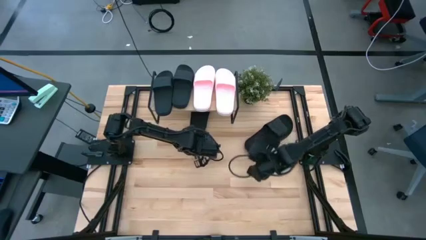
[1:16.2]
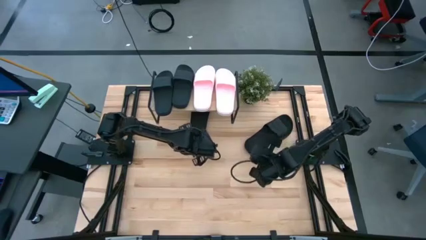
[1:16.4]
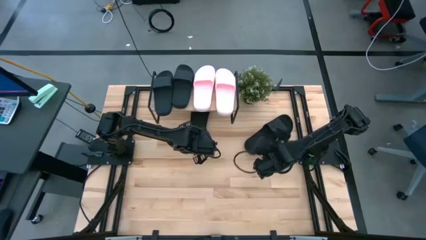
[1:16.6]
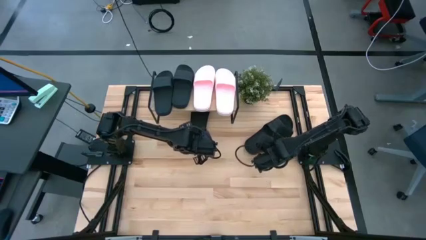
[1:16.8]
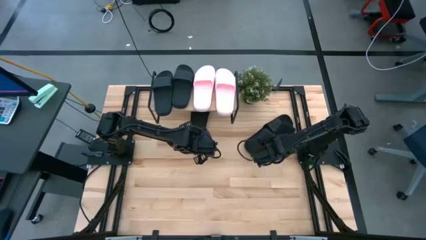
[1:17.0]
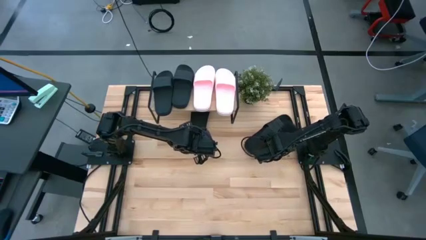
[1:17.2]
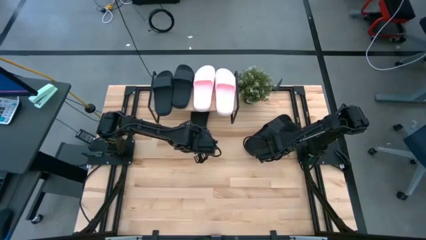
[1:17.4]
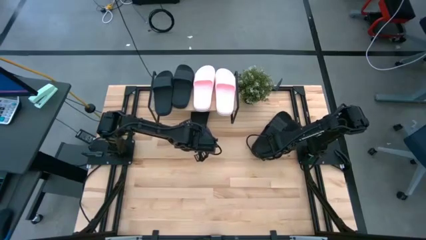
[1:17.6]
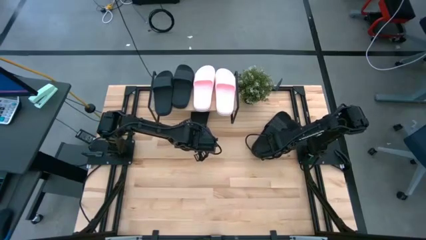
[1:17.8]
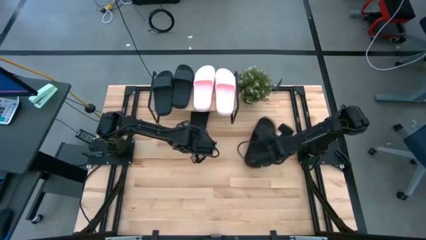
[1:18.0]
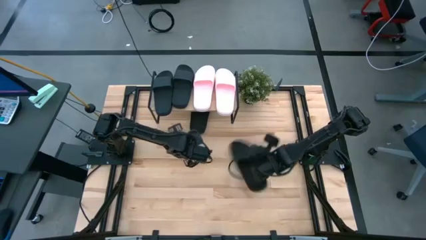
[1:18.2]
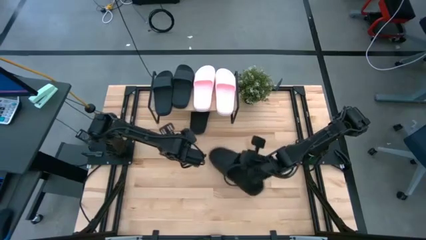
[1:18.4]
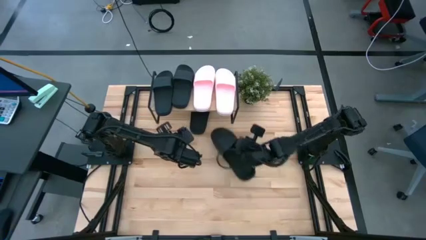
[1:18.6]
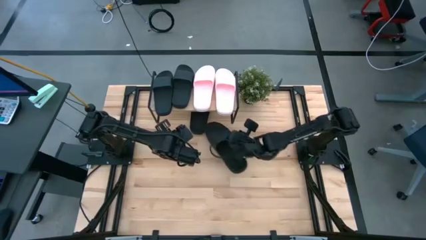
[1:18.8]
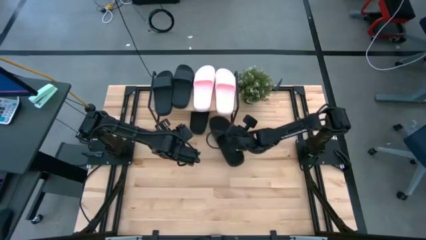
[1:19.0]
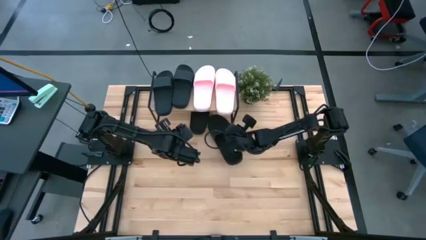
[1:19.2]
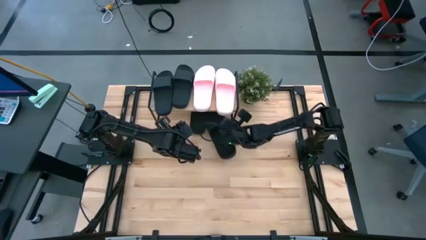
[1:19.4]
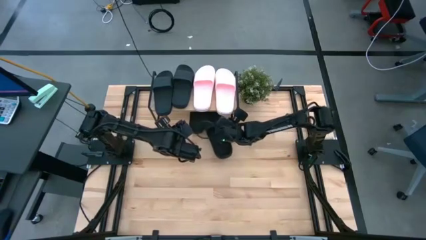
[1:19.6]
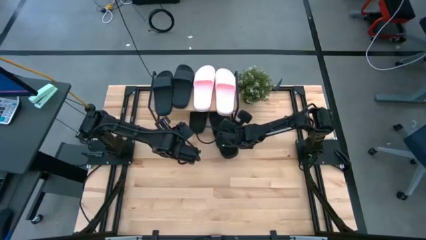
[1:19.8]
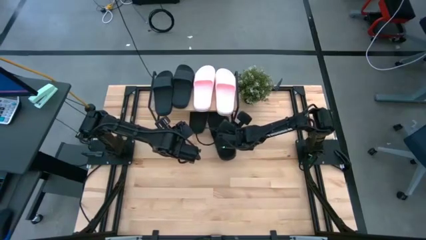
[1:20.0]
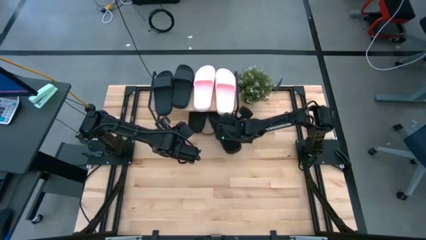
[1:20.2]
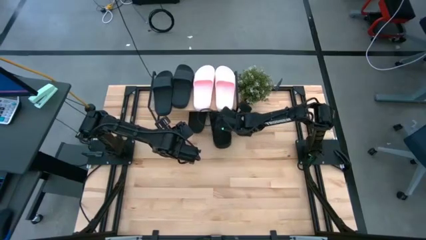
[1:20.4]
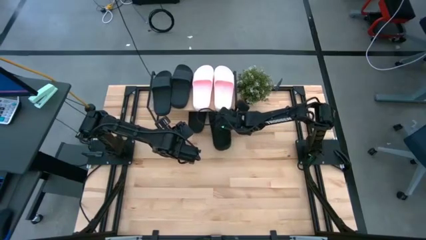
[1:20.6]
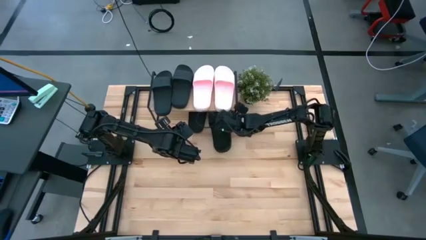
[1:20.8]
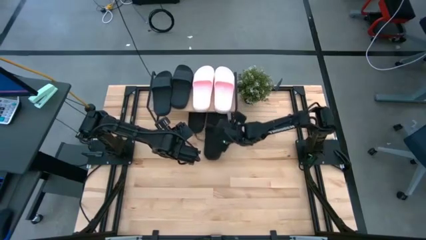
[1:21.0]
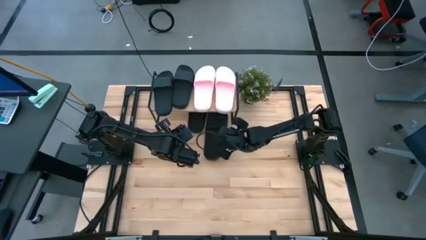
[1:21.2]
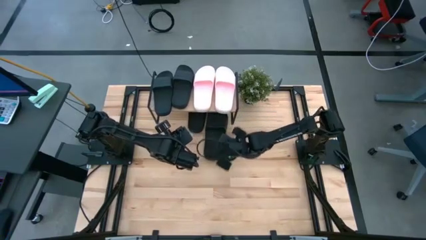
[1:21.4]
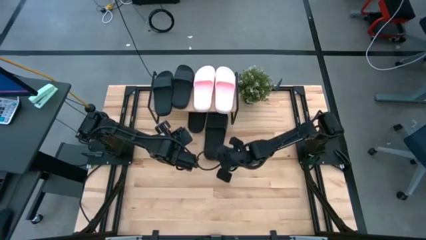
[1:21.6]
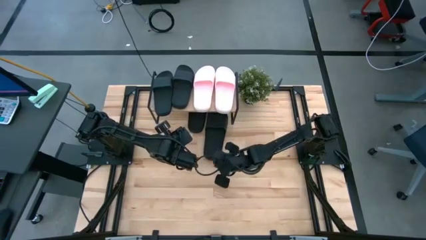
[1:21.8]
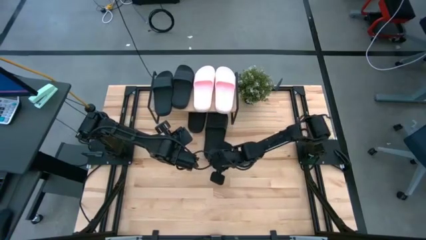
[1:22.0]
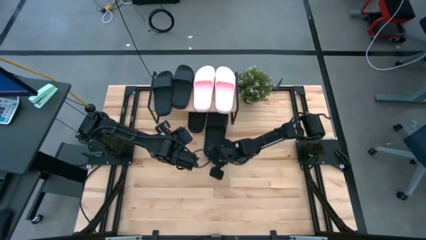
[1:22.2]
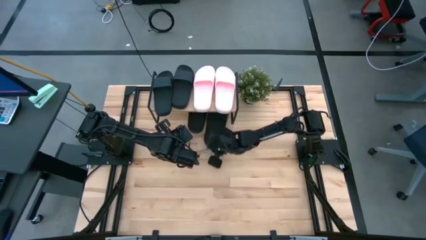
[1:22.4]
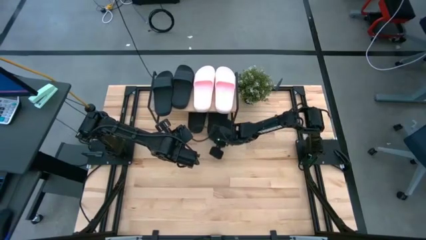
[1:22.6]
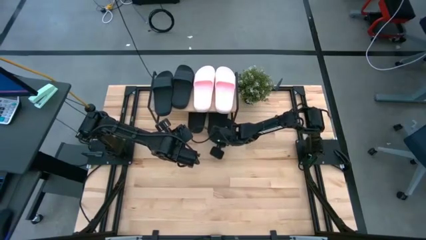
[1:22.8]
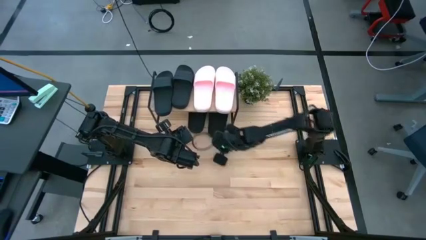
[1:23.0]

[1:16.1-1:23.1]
Task: Pick and place slides into the shelf
Put the black slipper under the shelf

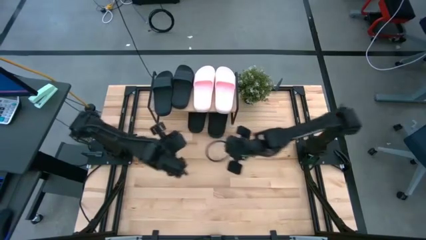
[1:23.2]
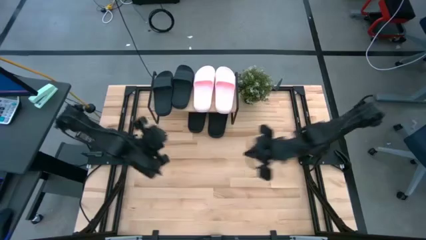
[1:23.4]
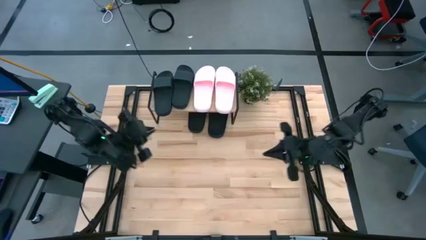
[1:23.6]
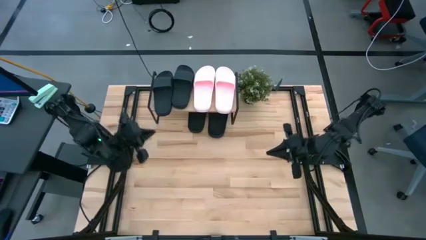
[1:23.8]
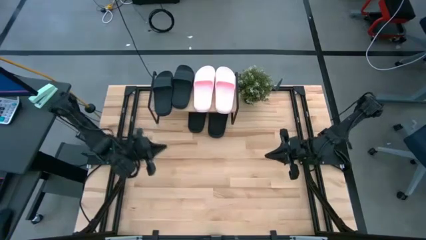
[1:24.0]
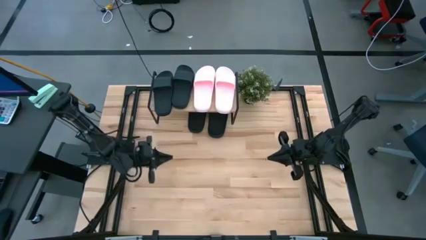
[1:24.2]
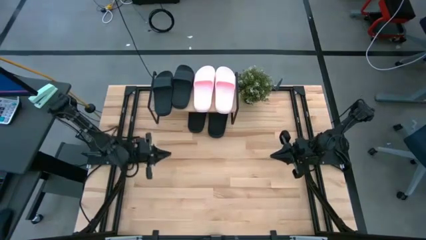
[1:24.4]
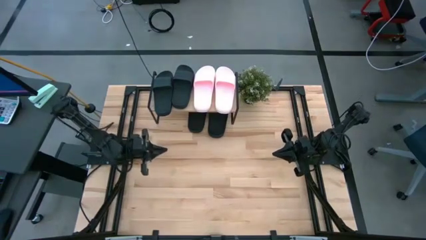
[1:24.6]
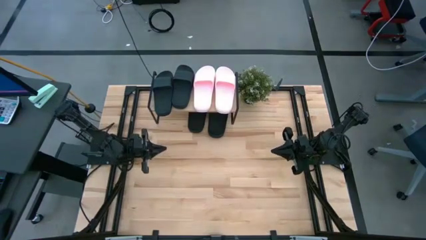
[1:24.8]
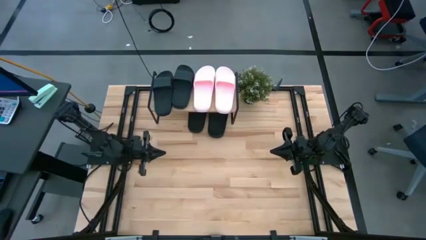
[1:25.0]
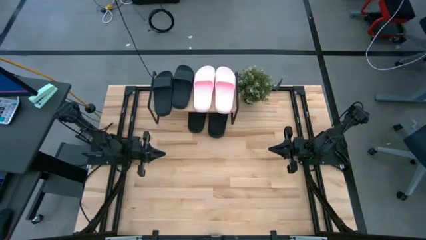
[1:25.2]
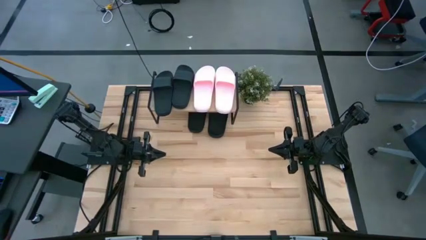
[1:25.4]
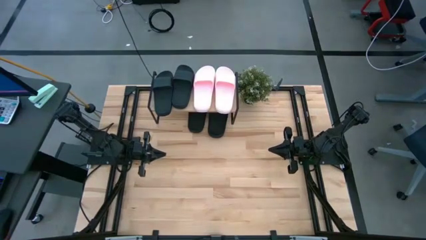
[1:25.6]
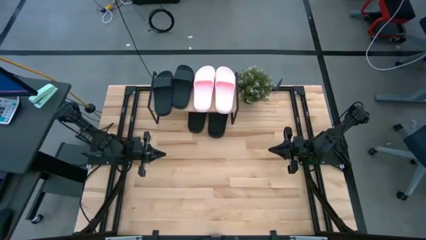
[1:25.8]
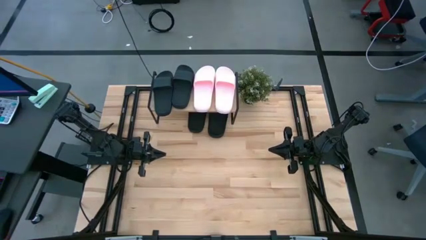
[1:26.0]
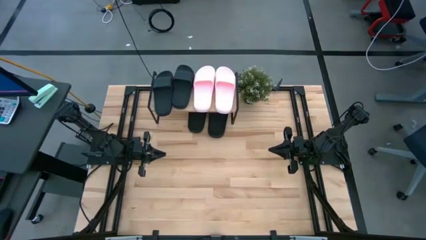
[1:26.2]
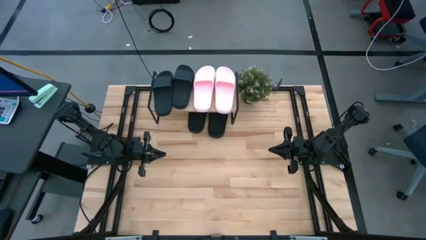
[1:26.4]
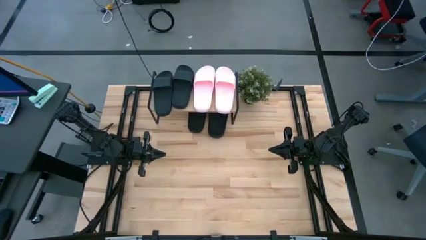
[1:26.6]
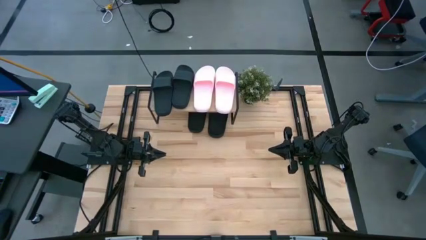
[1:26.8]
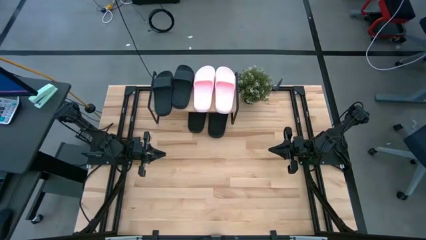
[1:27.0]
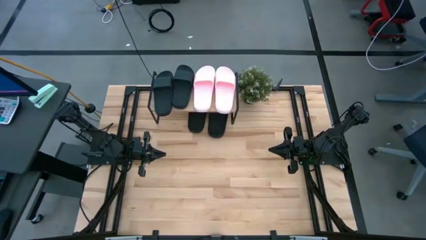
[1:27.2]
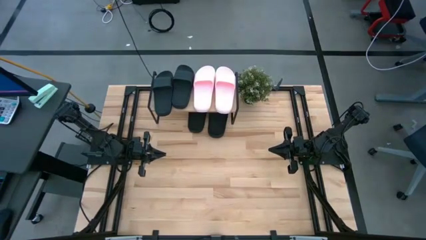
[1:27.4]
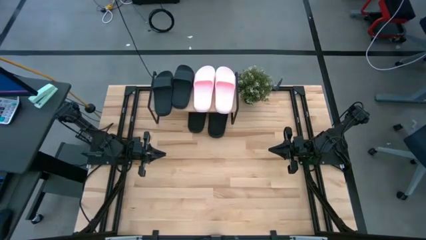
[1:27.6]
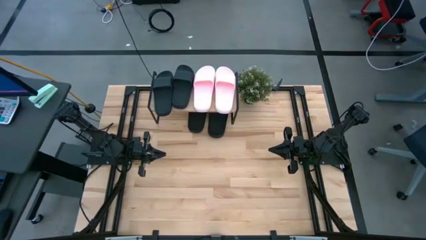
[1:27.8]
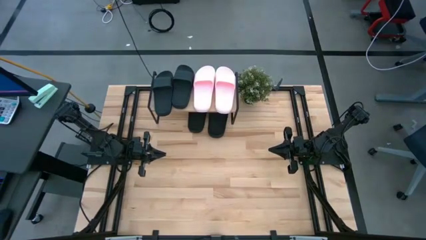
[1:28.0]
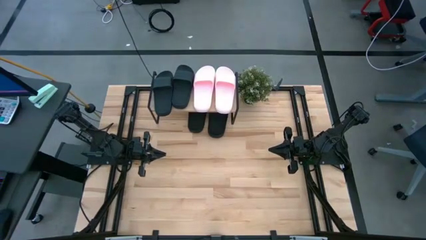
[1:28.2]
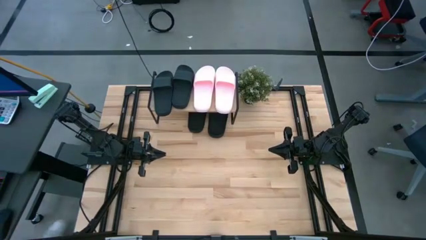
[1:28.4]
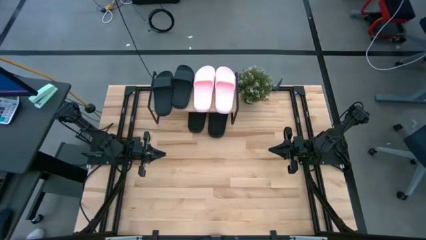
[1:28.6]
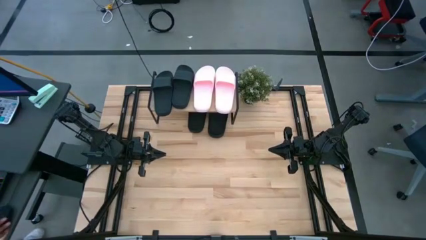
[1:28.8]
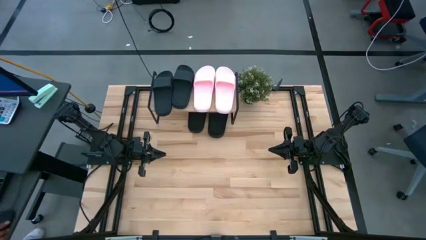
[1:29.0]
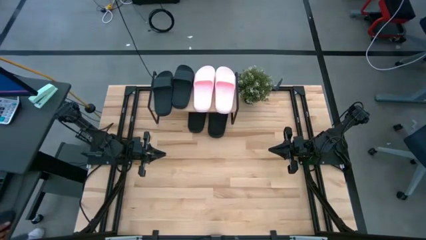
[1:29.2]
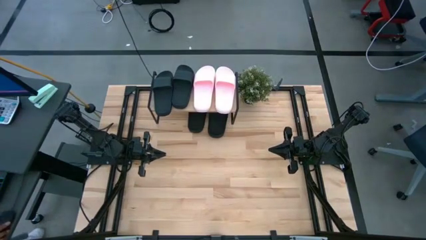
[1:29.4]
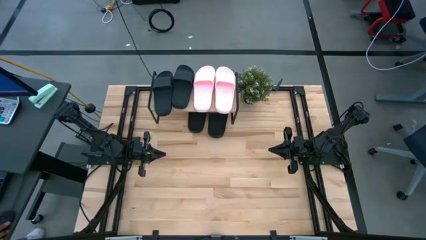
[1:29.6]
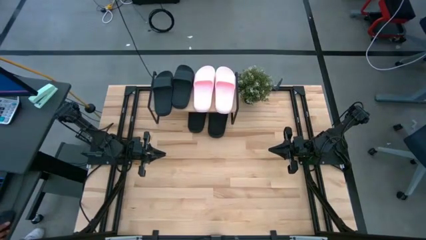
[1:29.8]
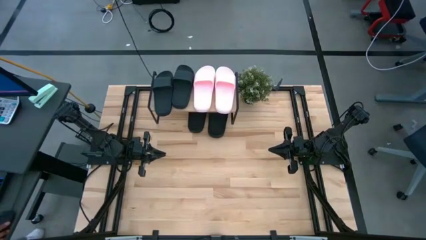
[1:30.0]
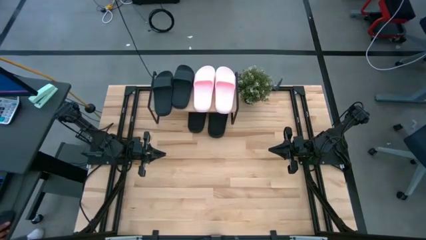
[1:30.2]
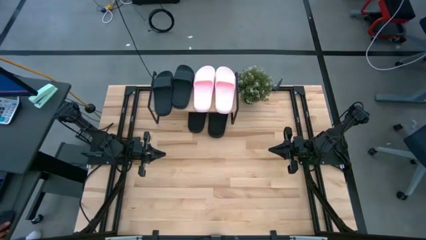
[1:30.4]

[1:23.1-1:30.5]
Return to Home Position

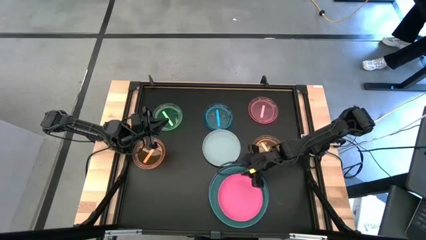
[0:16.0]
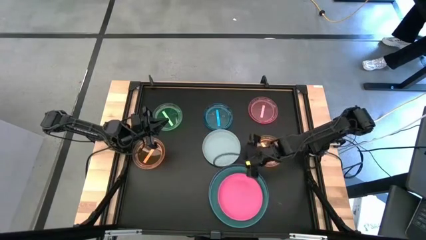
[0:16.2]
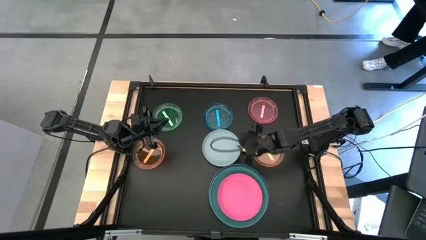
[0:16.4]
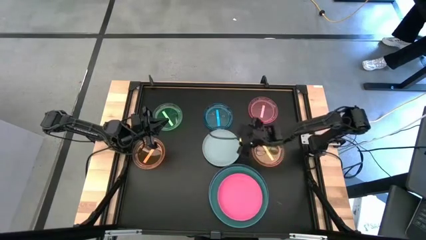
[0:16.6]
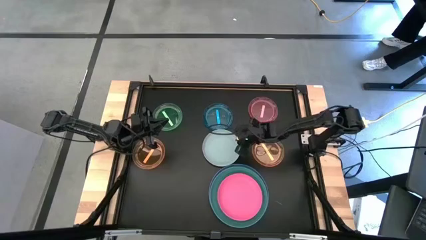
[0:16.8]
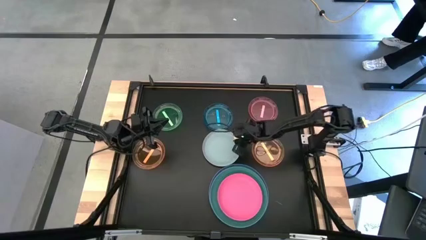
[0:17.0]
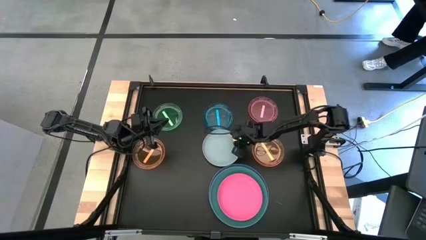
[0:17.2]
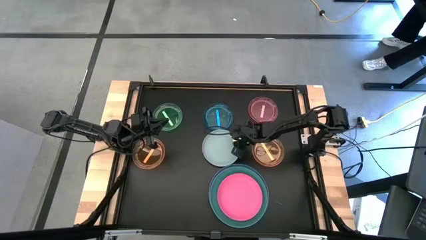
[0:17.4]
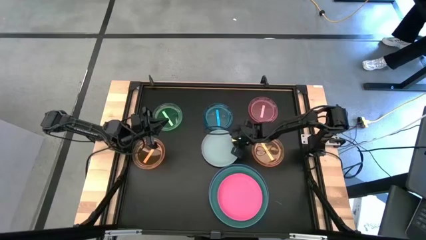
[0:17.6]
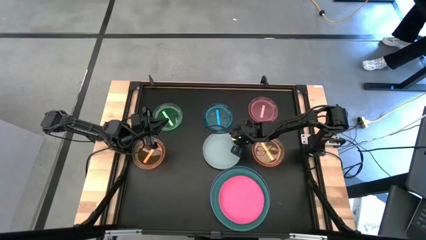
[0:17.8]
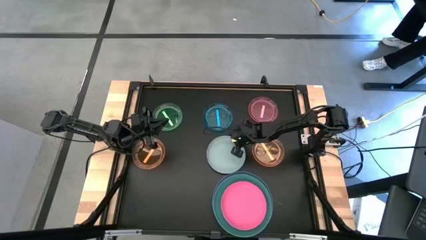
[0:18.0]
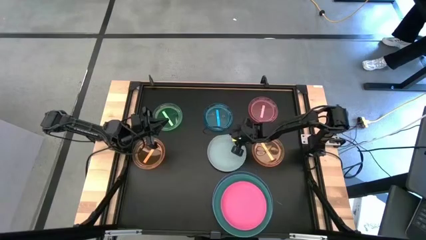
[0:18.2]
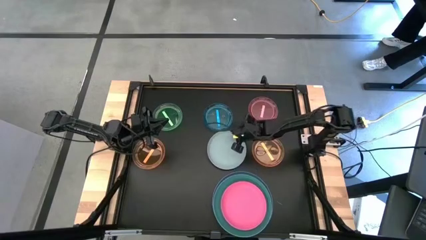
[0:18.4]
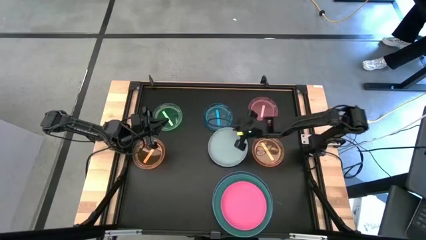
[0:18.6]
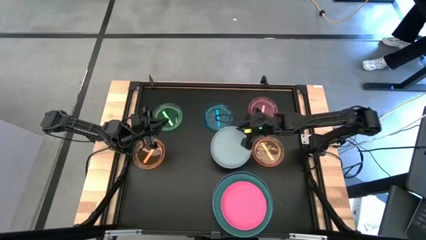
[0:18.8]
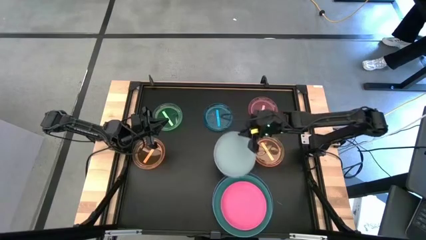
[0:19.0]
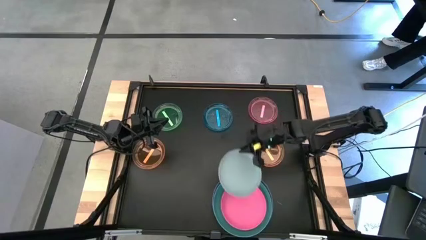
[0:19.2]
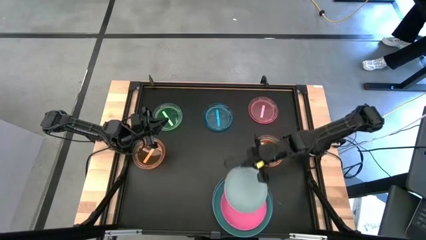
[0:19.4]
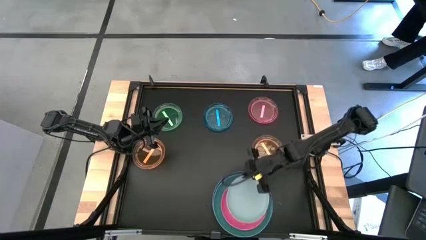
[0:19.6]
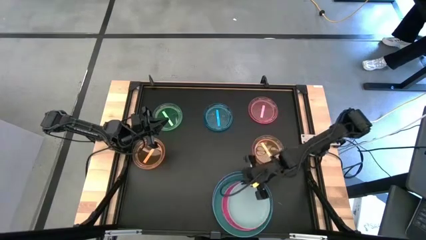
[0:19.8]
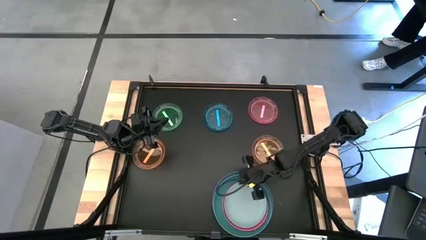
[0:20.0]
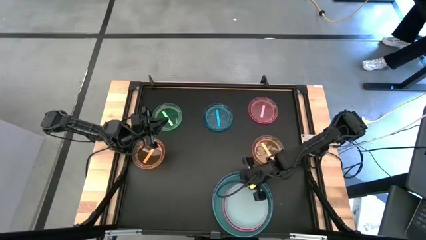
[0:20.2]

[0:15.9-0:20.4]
Task: Stack plastic plates
Stack the gray plates on top of the pink plate
